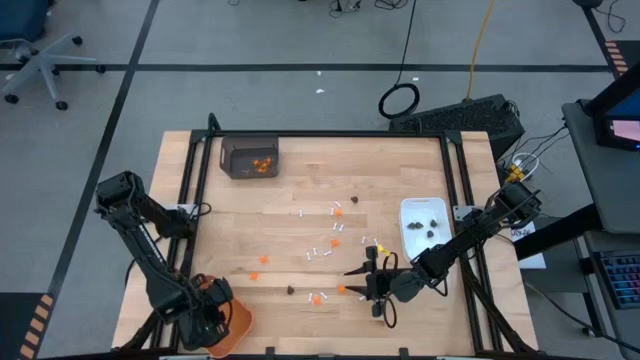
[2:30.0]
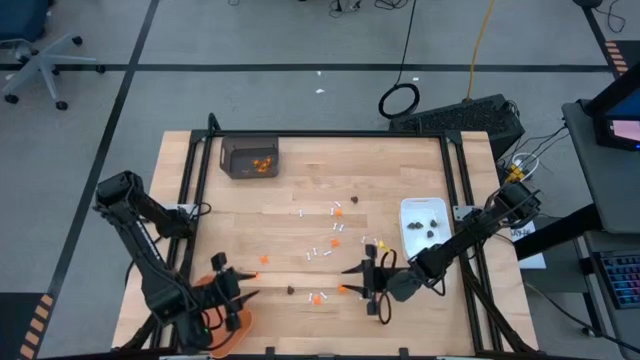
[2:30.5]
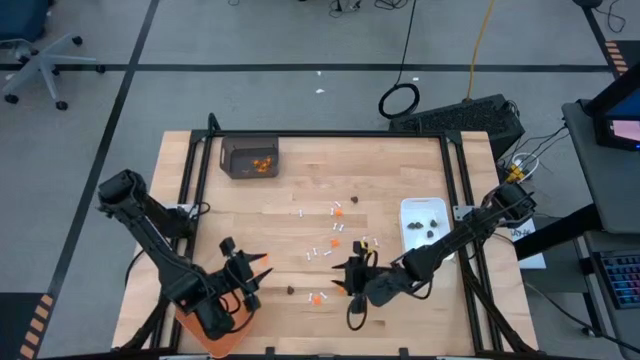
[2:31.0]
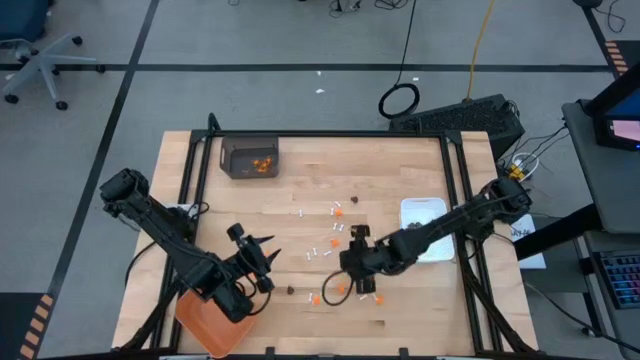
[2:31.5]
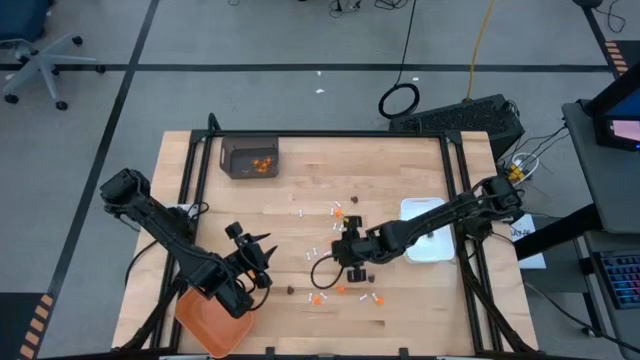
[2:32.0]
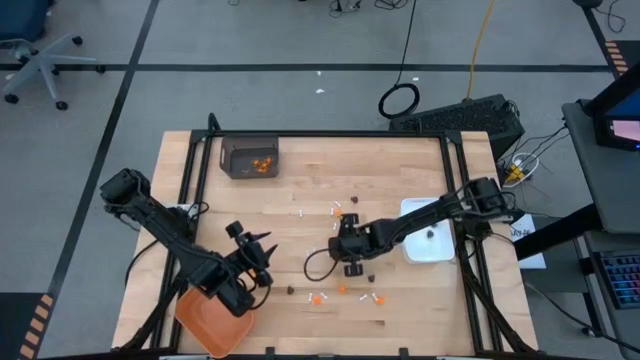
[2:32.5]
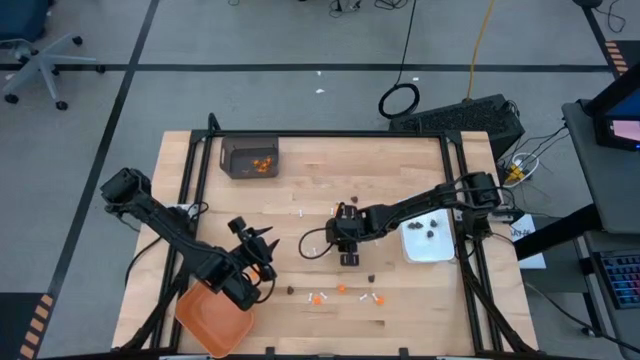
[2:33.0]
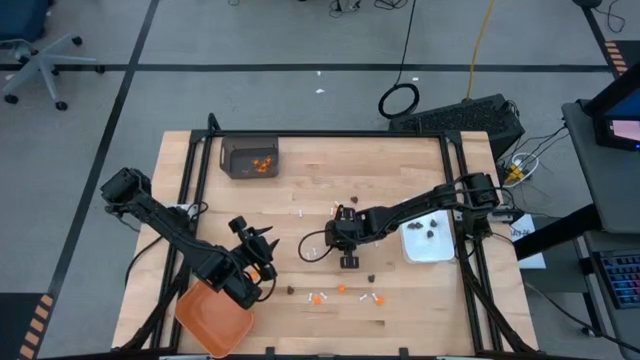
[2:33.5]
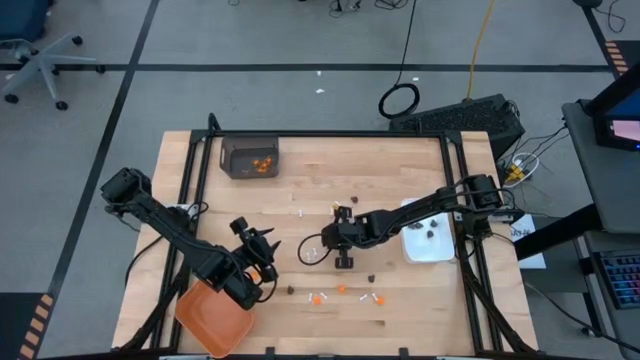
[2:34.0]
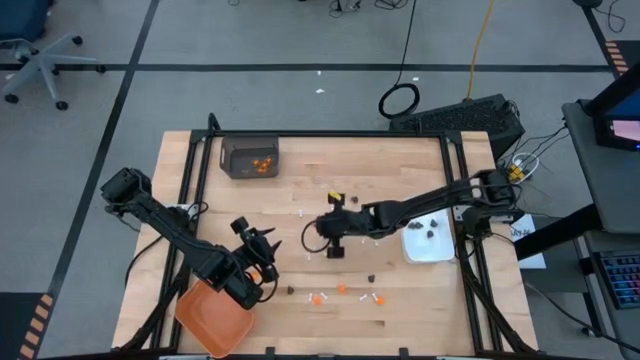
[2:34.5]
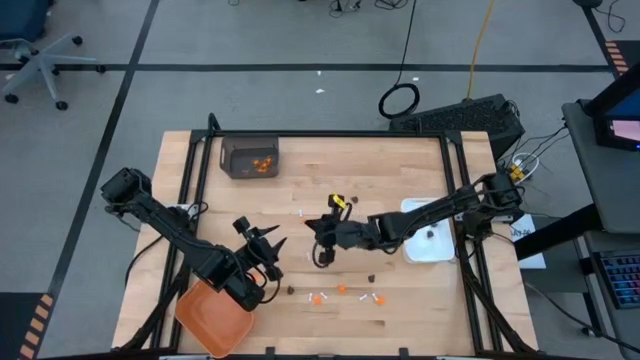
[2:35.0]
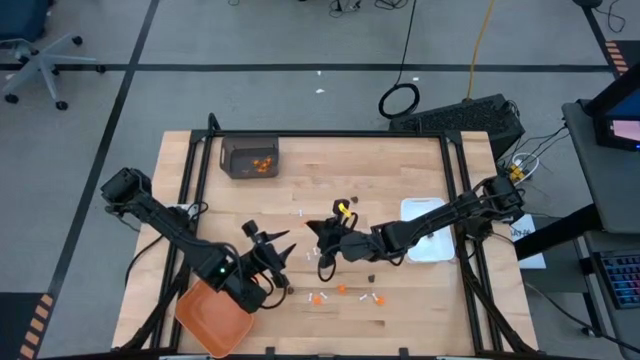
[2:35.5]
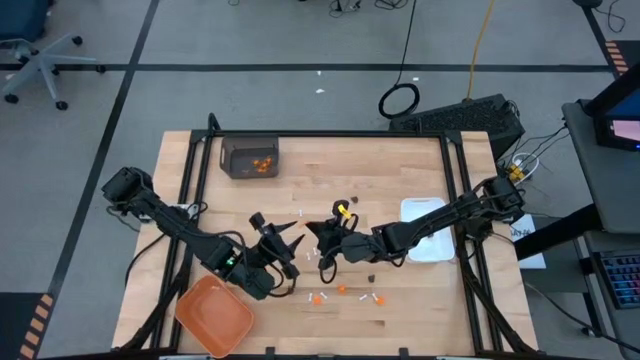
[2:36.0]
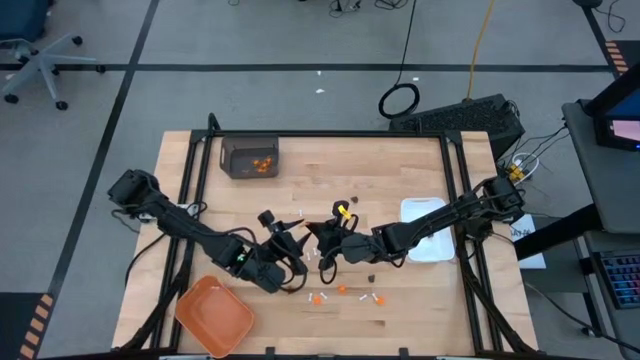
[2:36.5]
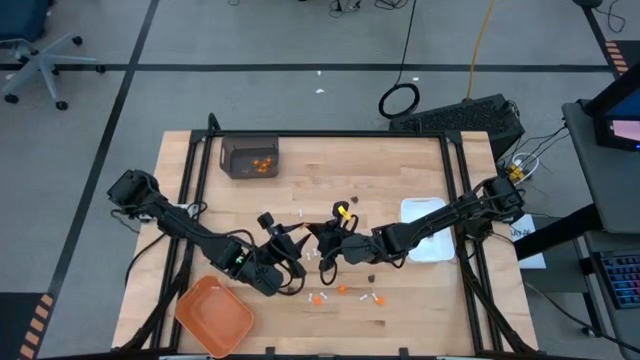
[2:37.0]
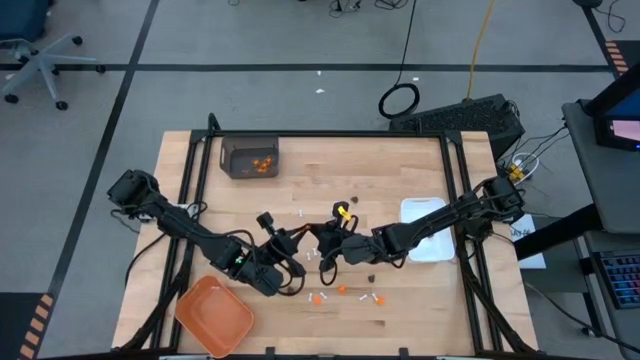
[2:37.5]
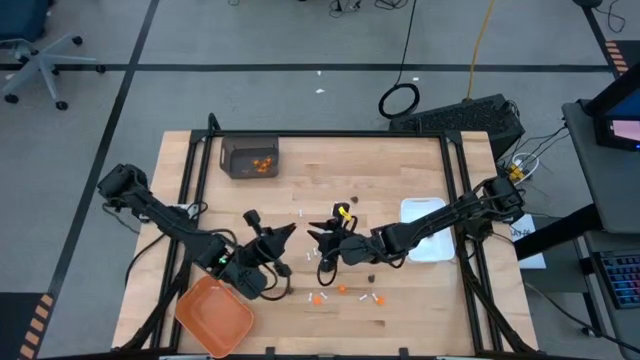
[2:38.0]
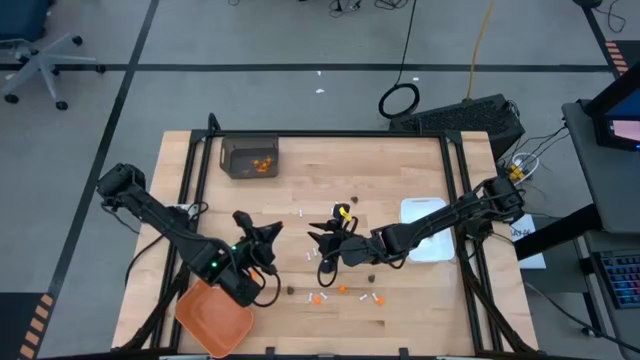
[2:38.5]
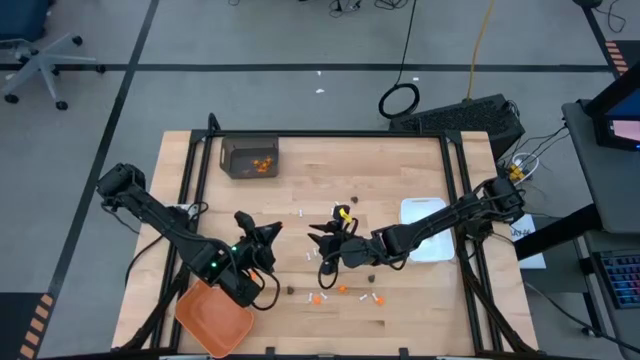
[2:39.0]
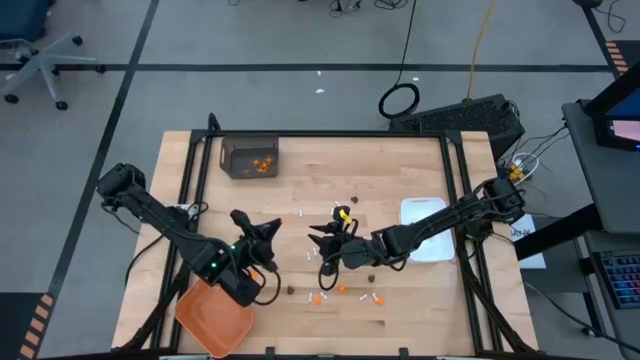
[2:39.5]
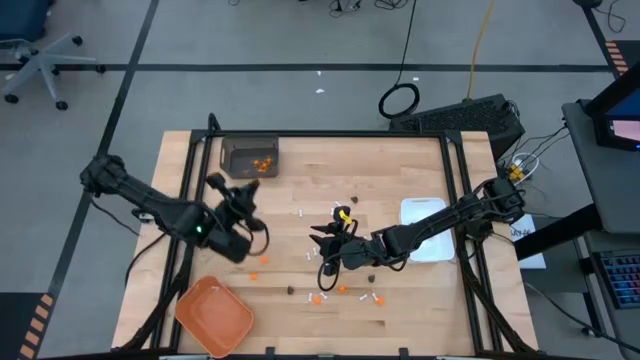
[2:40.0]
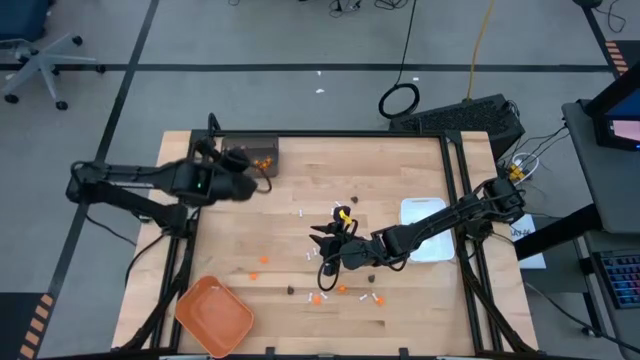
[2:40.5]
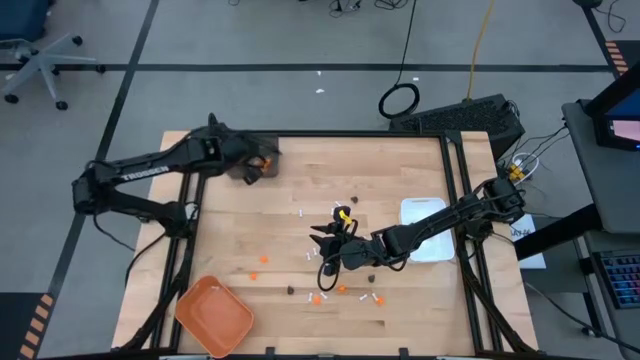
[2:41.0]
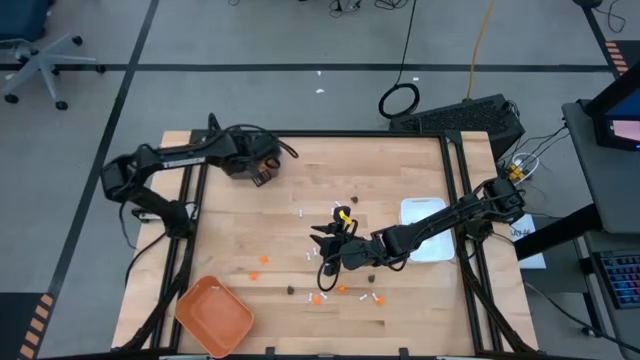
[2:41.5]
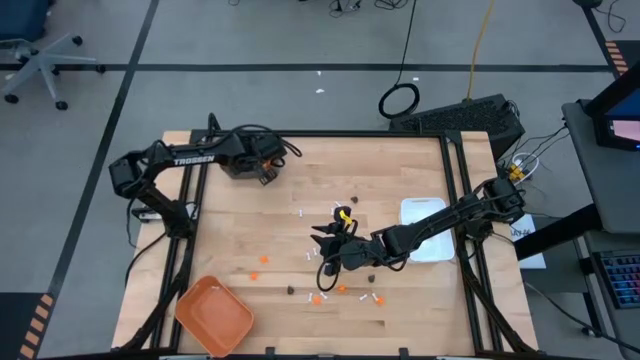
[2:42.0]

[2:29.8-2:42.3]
Task: Sort Halloween decoration
Put the orange spider toy into the black bin

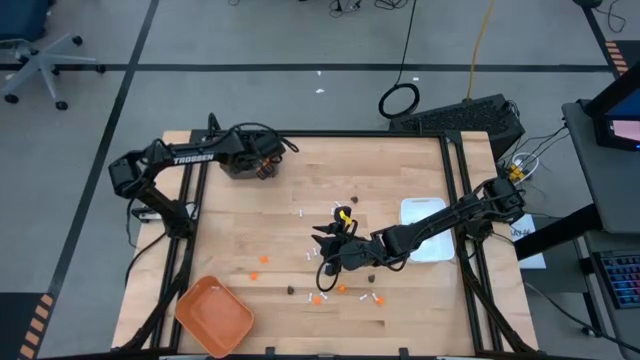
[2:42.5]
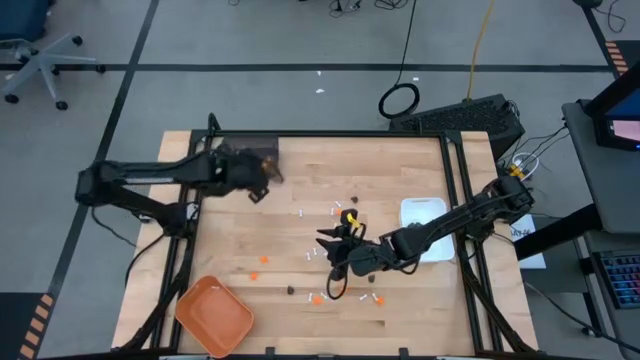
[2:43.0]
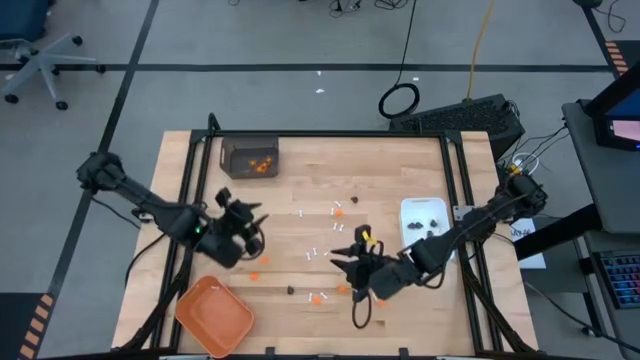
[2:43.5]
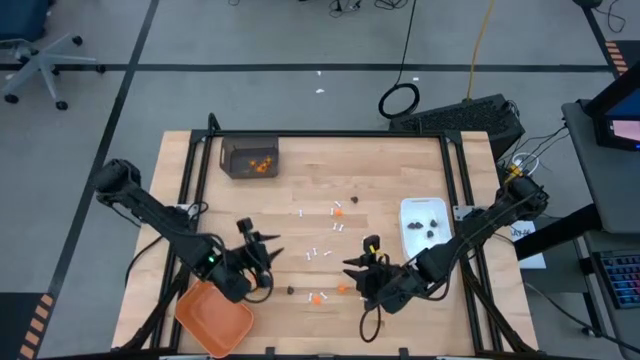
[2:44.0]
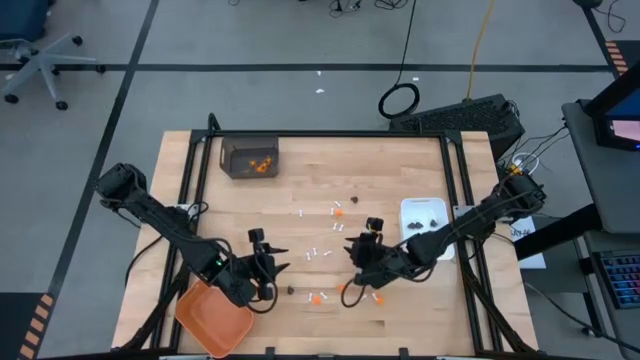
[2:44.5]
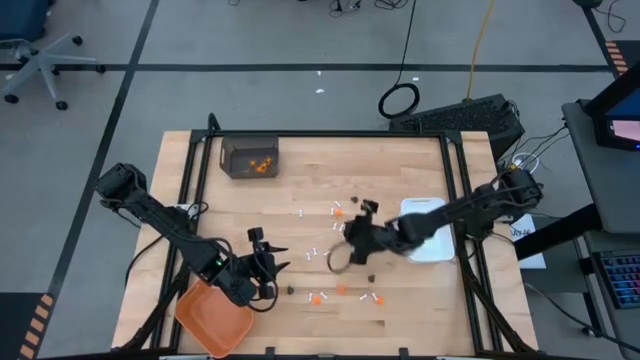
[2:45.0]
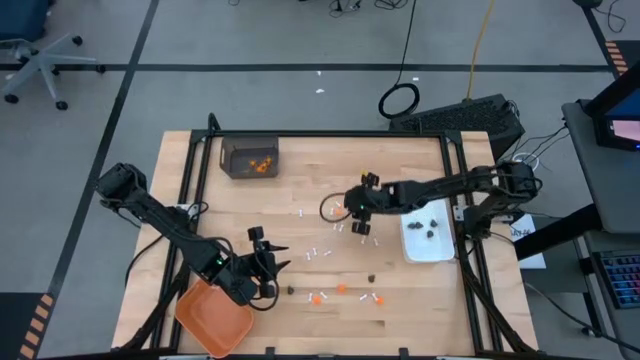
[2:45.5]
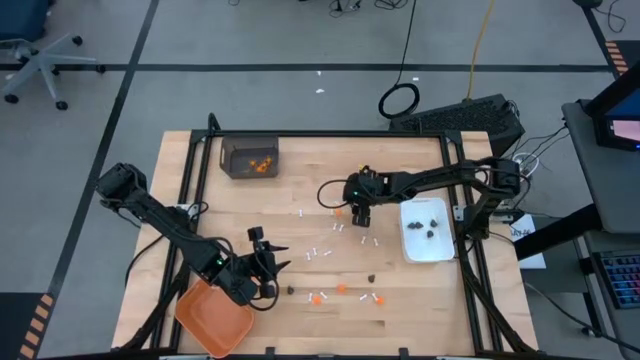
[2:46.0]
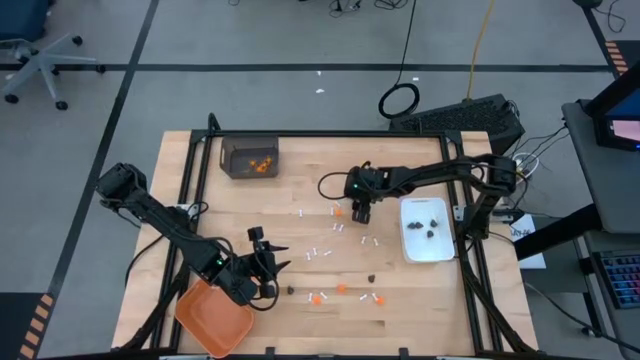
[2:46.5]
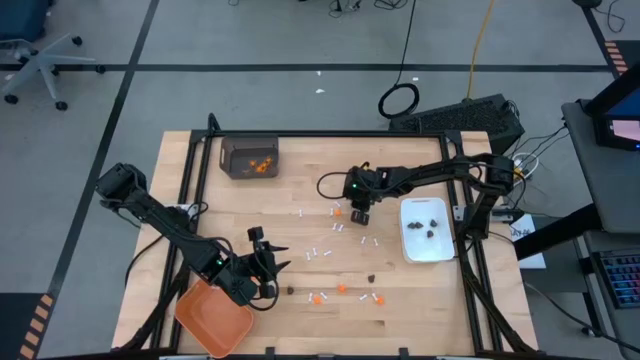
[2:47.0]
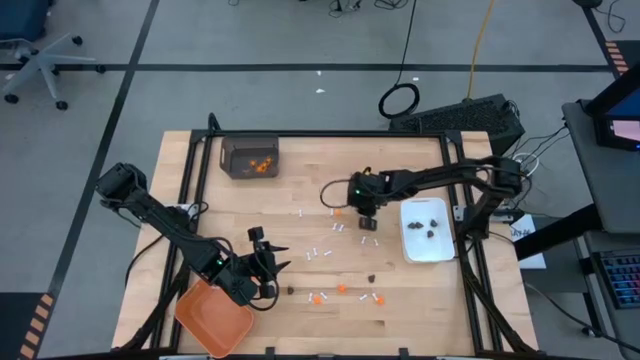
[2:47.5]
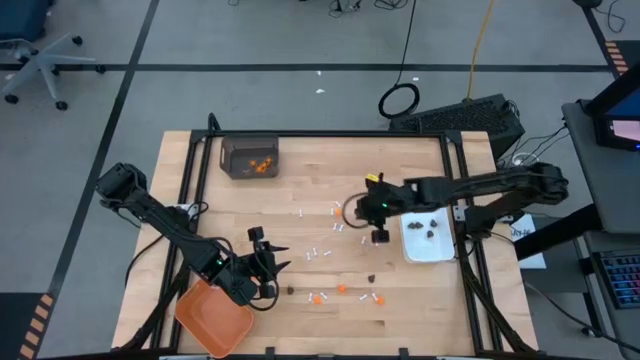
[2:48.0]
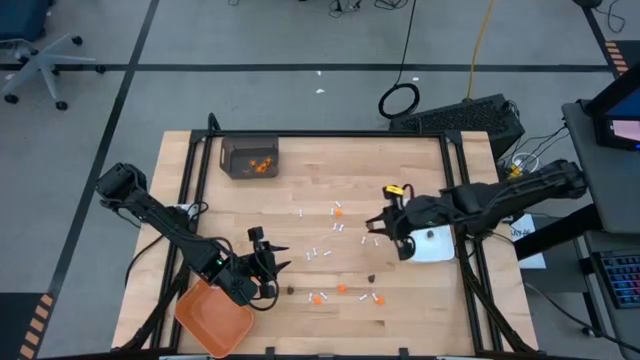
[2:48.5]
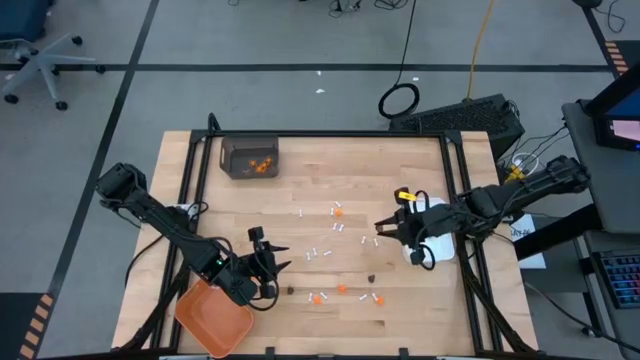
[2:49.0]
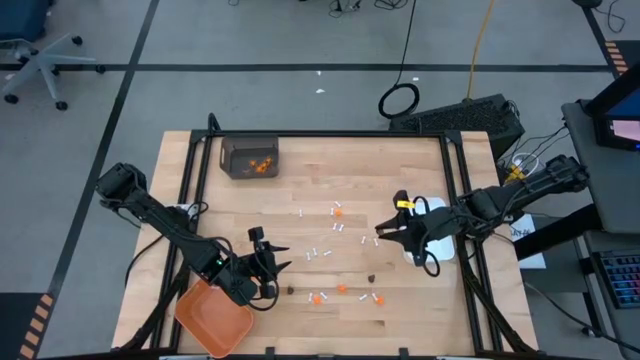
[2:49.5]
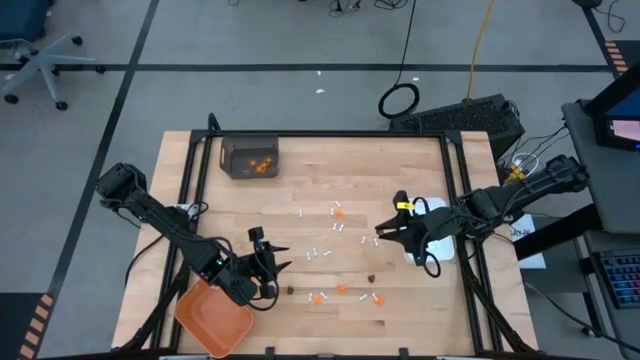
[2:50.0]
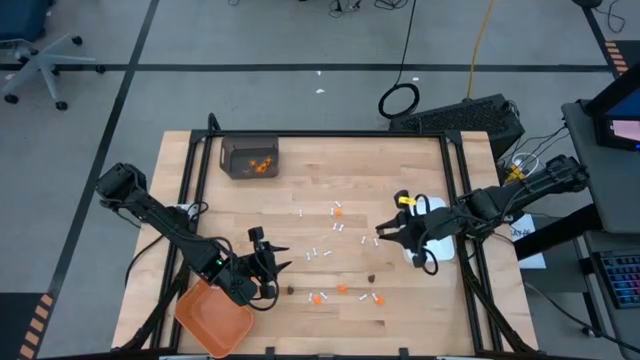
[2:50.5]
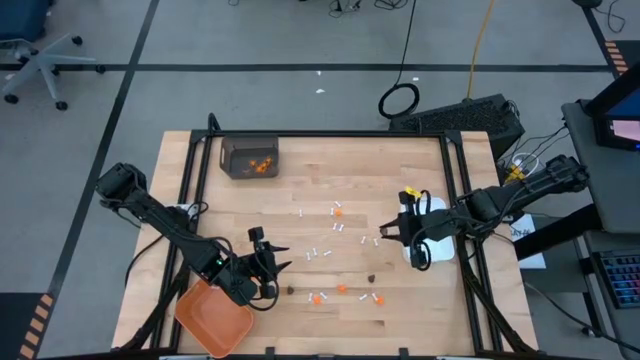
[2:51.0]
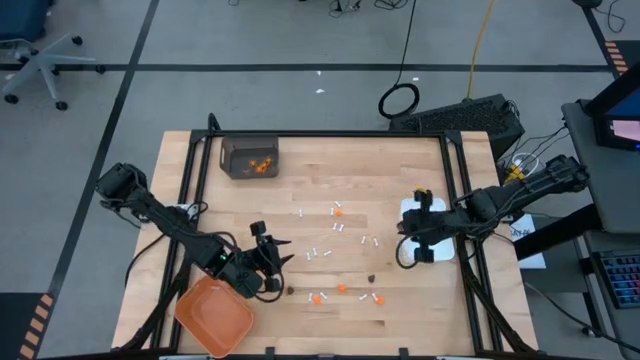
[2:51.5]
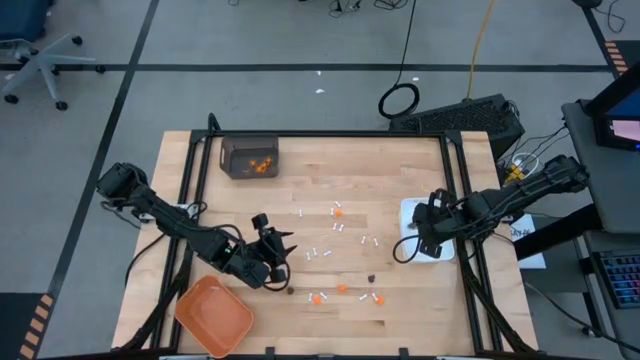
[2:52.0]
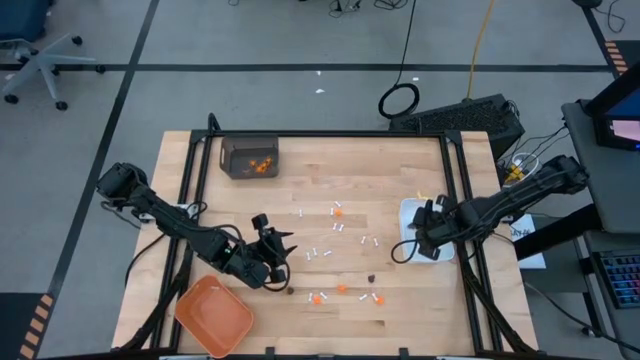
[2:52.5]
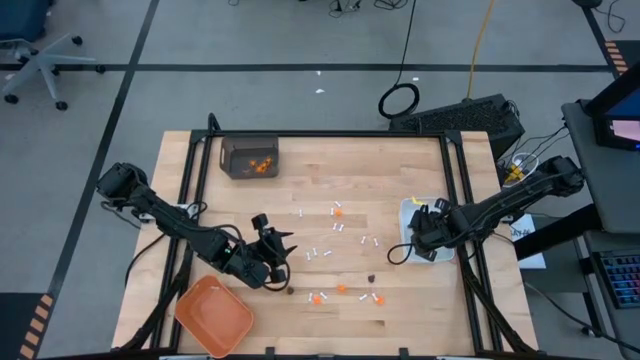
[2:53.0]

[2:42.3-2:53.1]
Put the black skull toy into the white bin
